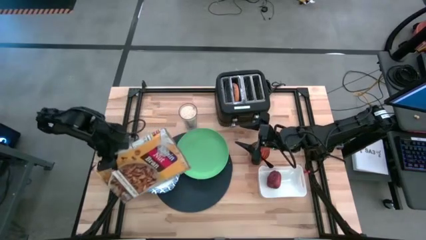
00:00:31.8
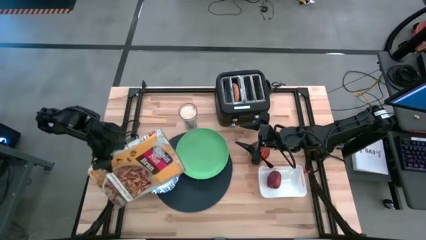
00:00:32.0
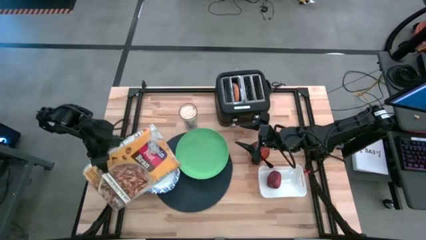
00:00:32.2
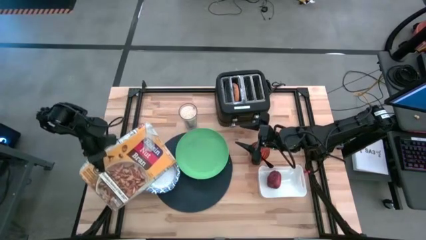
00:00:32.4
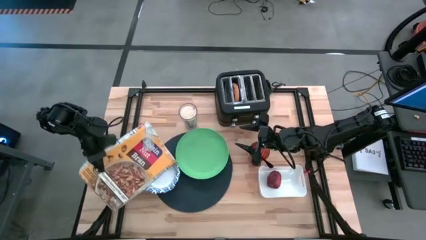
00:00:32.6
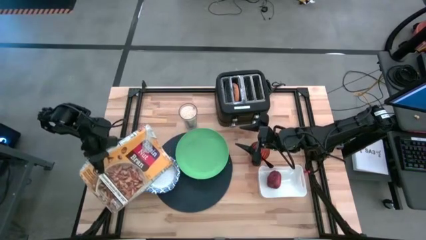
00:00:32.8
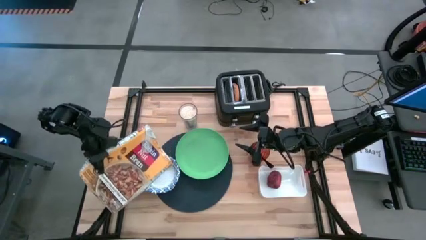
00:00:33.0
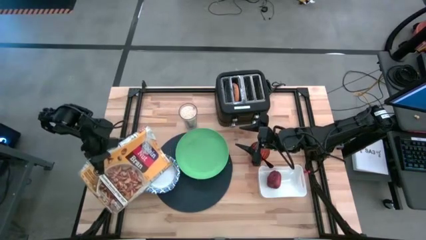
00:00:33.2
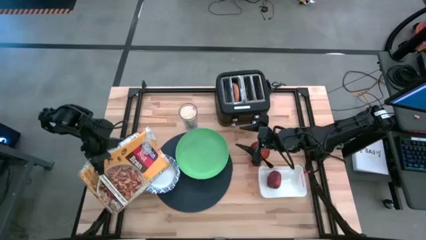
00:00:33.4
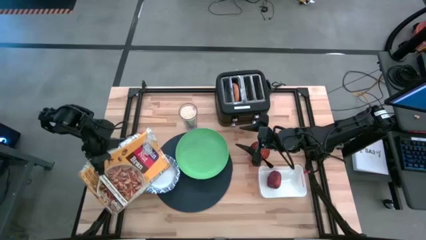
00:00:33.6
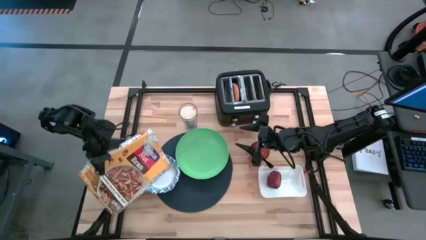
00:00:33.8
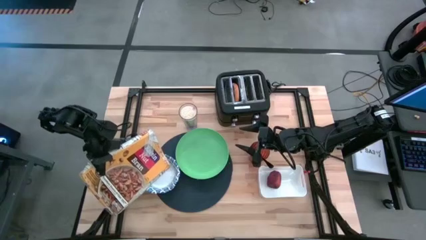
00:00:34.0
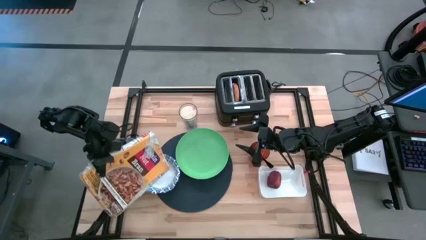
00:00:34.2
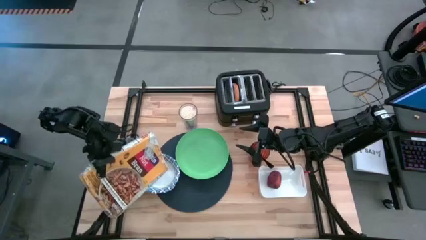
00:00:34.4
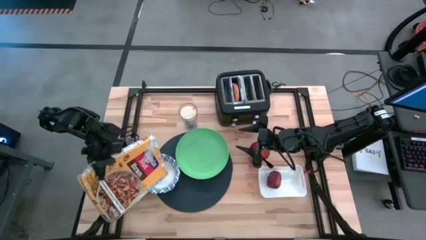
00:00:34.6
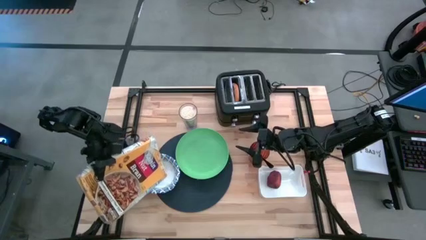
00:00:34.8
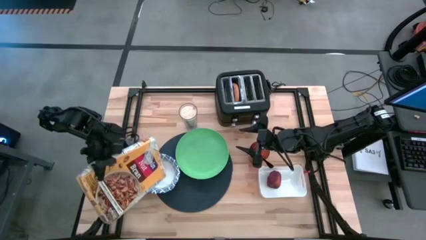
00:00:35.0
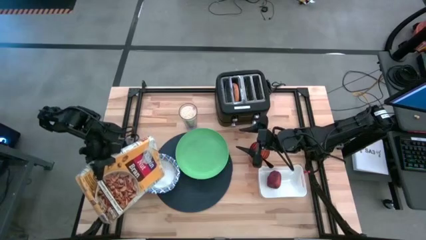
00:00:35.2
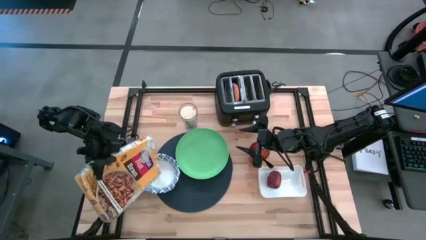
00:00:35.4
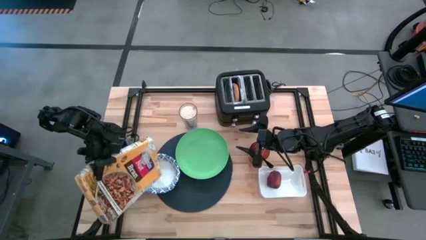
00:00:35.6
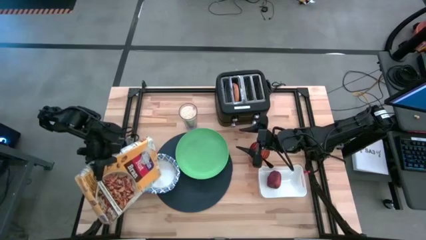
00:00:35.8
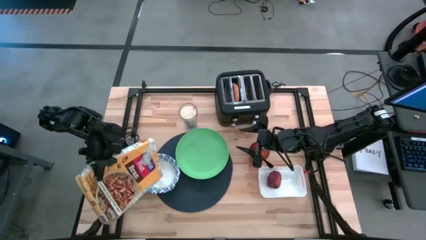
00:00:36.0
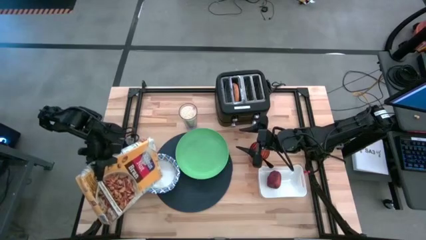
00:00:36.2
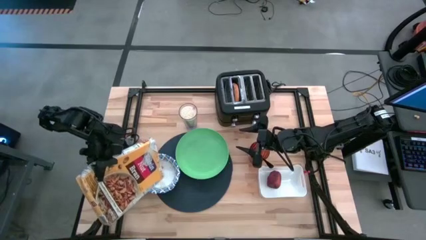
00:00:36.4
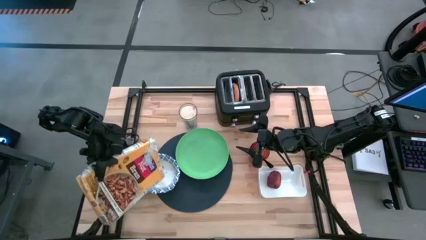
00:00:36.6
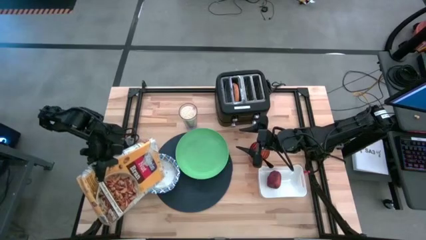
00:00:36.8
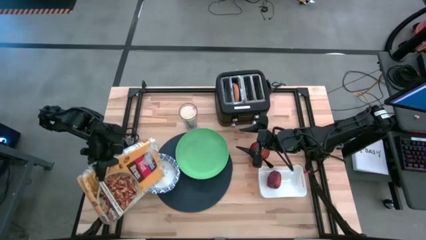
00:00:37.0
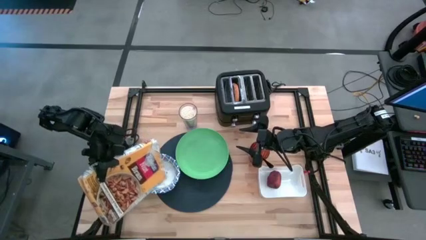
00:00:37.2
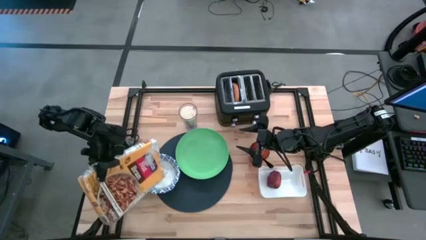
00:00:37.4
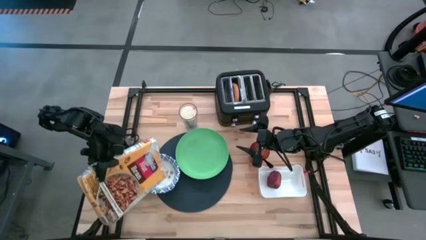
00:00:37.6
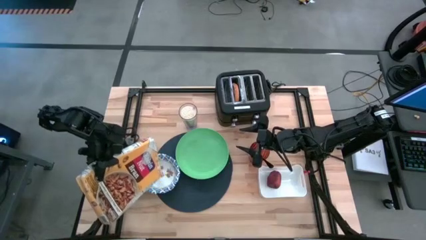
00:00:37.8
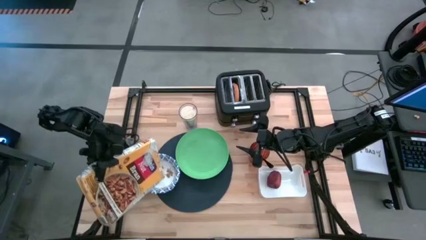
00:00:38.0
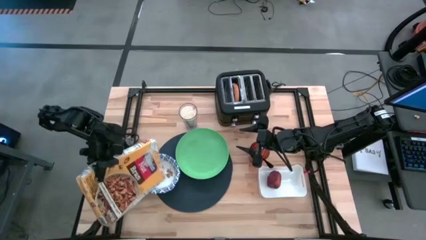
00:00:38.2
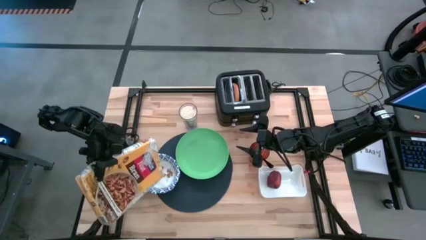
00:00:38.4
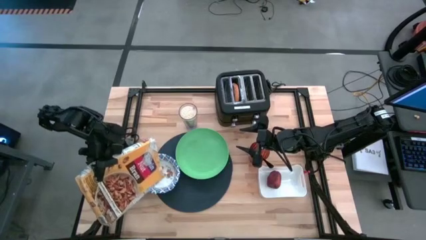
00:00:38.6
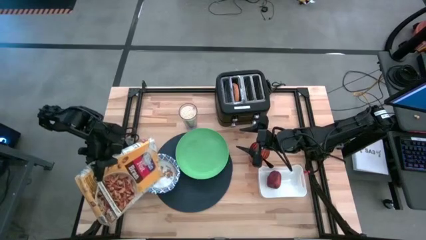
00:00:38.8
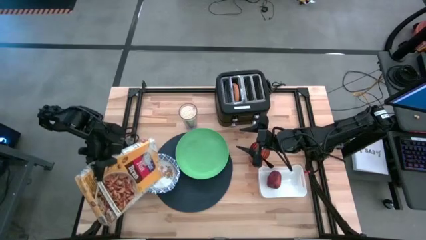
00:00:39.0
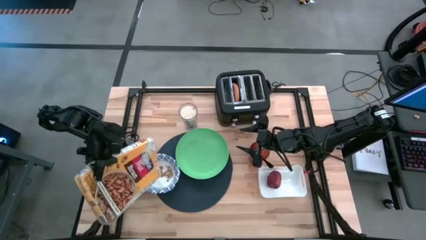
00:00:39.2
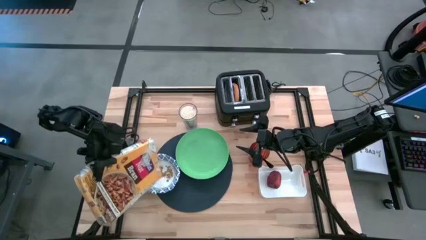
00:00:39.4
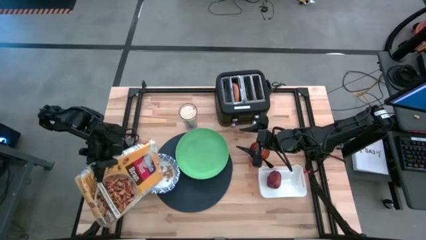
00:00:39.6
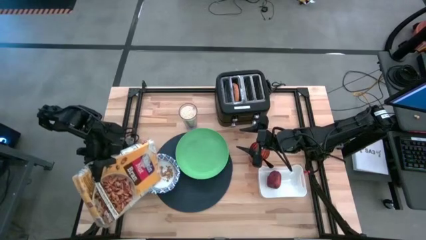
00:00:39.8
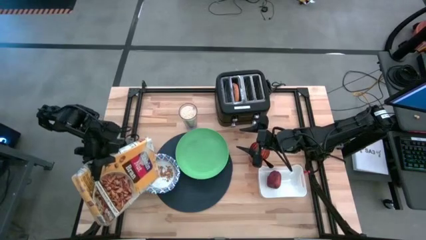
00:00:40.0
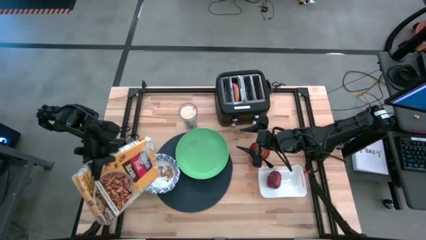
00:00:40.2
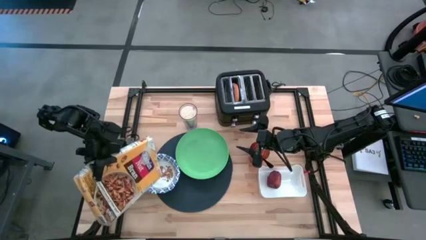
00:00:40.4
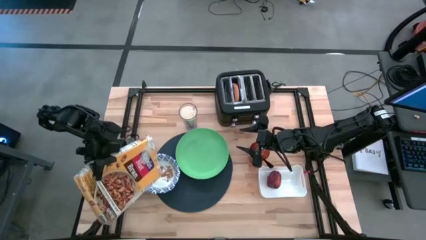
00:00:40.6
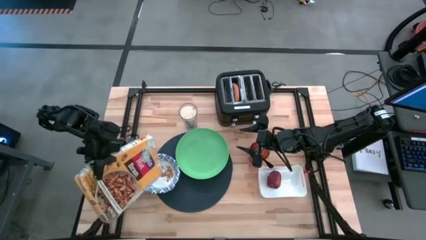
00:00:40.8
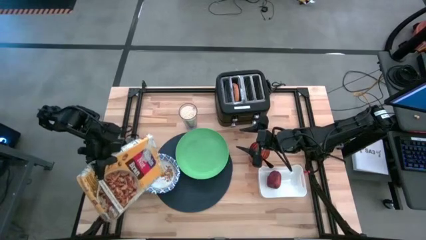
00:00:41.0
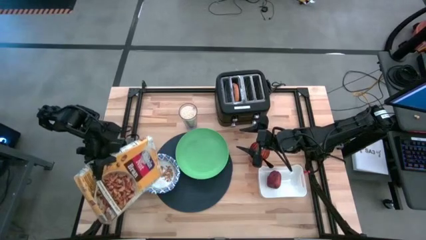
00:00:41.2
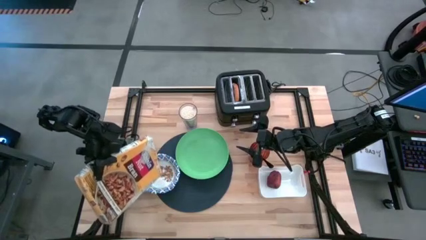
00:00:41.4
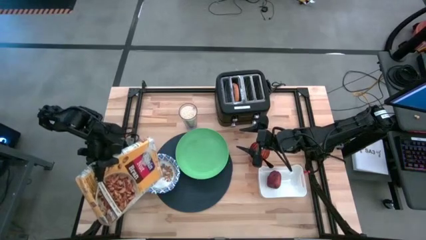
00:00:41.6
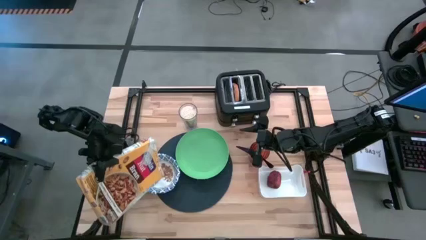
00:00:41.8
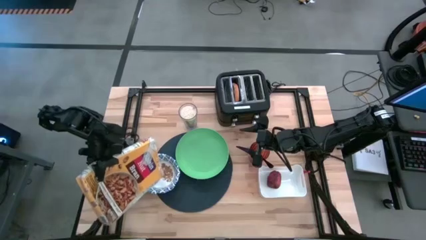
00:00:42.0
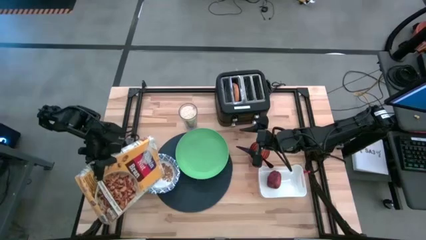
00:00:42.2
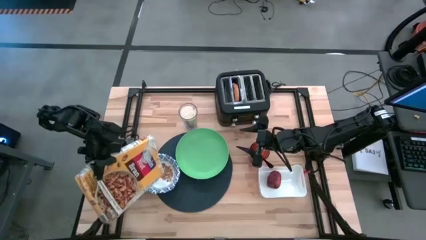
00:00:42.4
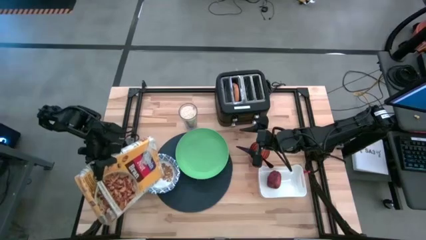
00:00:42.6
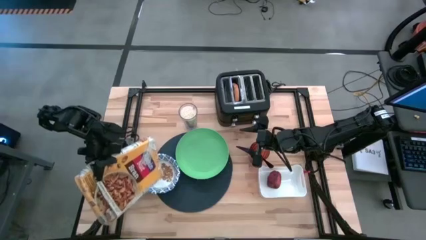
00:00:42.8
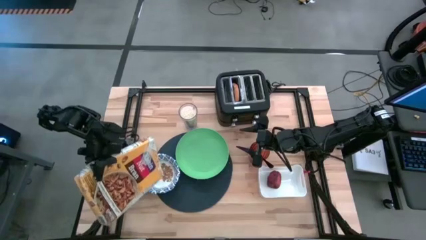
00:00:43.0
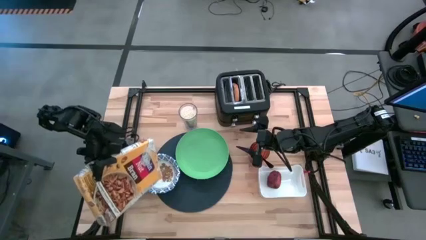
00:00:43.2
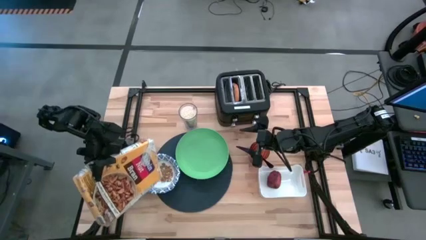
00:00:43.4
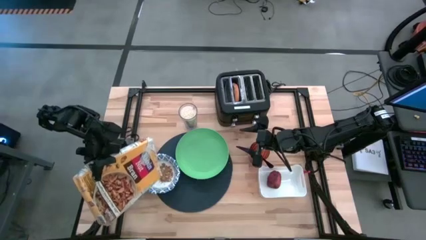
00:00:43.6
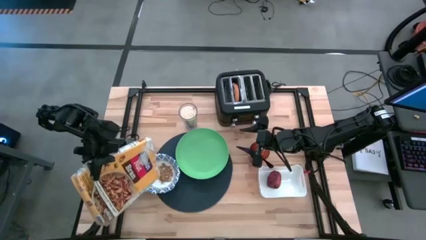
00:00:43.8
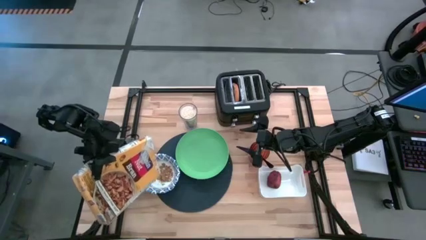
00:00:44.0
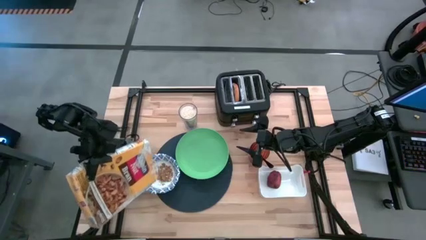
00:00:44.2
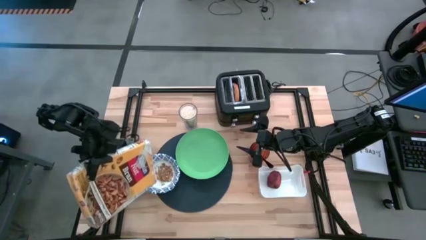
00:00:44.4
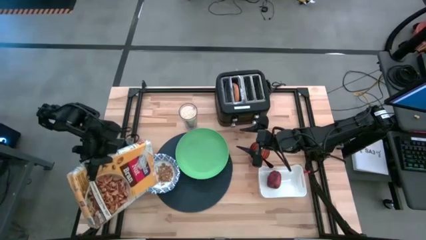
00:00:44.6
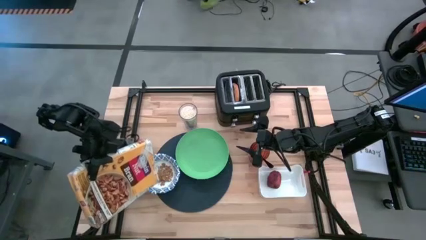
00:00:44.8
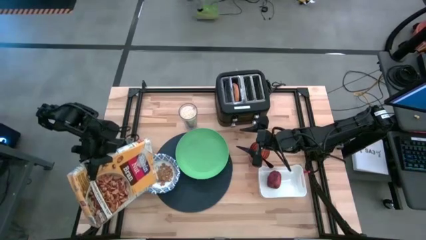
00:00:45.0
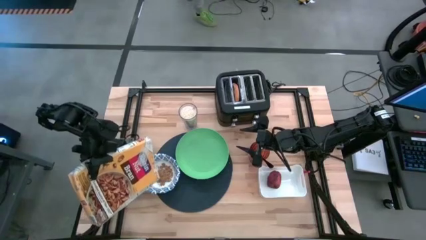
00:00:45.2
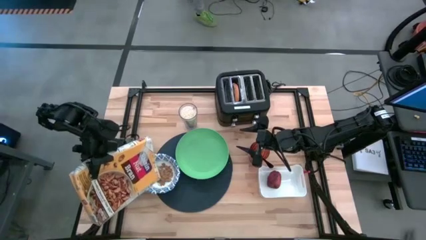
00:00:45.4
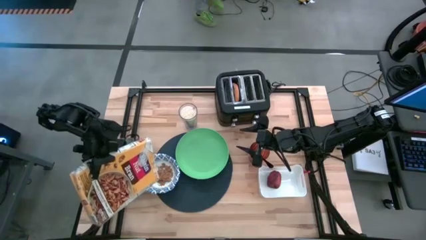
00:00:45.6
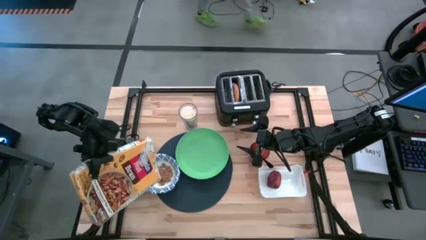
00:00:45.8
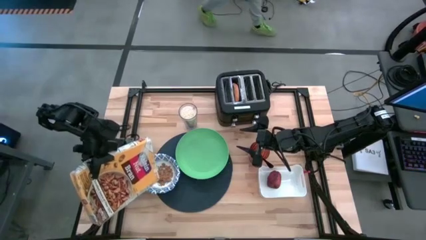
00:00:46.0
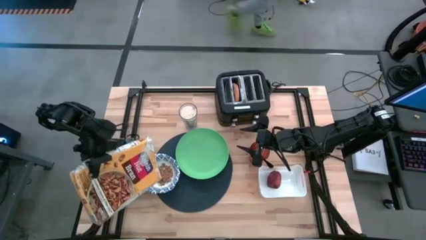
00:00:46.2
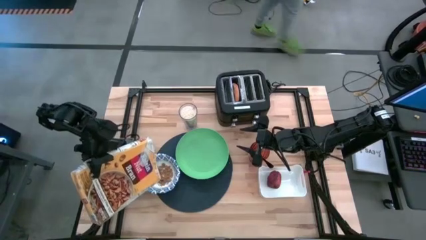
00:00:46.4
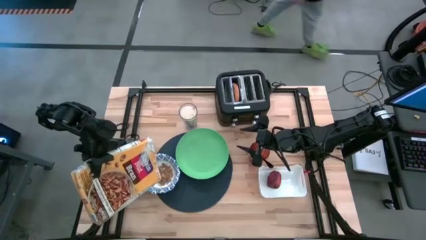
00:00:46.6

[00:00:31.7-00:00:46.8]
Task: Arrange a breakfast setting
Pour the cereal from the cereal box into the white bowl
